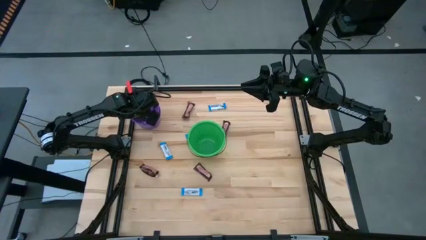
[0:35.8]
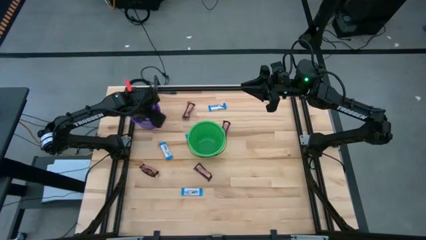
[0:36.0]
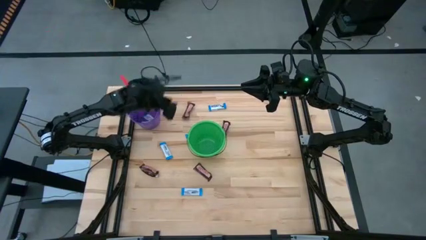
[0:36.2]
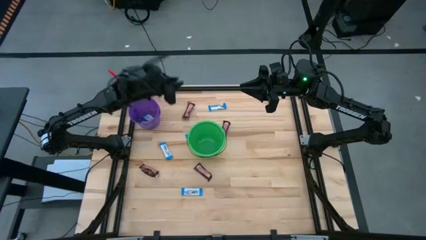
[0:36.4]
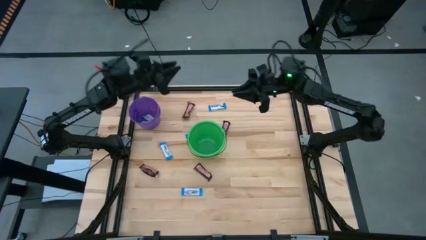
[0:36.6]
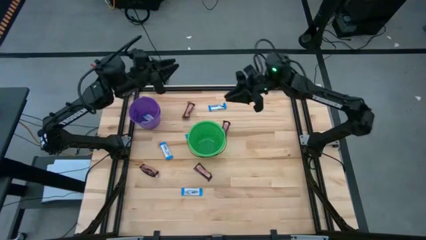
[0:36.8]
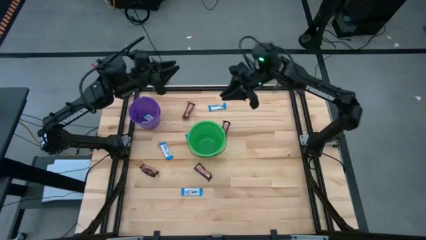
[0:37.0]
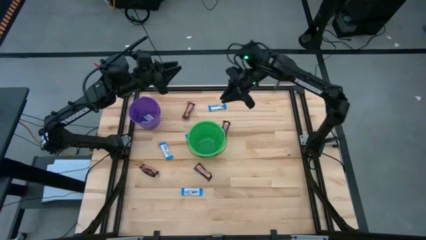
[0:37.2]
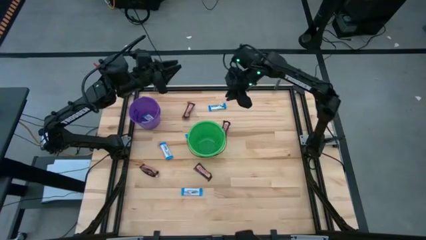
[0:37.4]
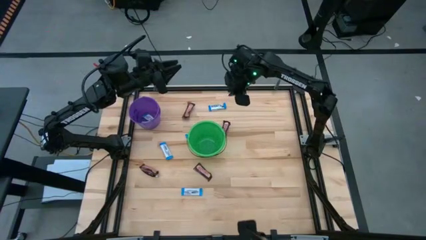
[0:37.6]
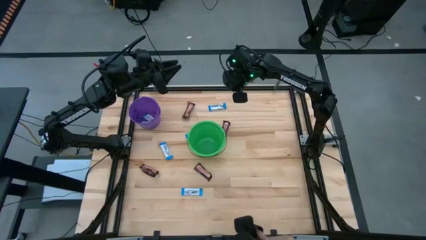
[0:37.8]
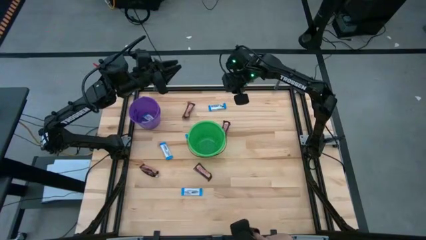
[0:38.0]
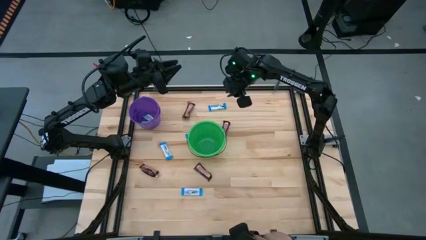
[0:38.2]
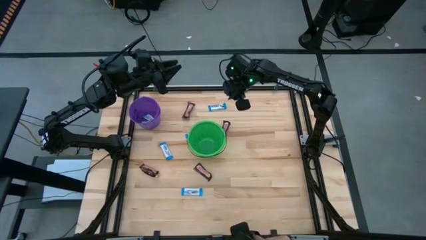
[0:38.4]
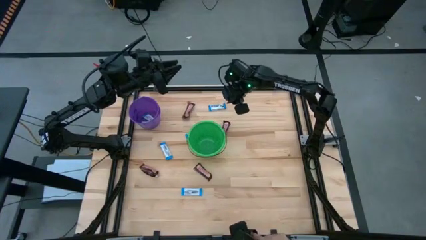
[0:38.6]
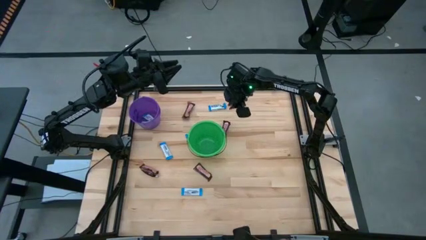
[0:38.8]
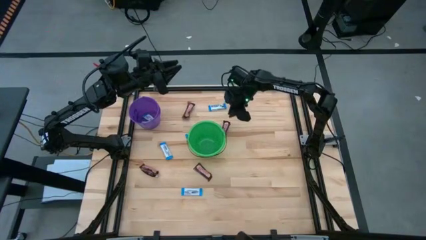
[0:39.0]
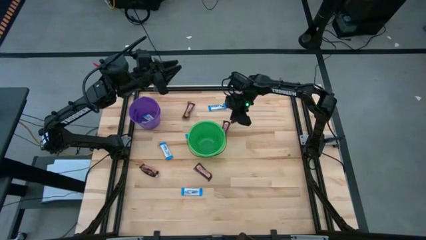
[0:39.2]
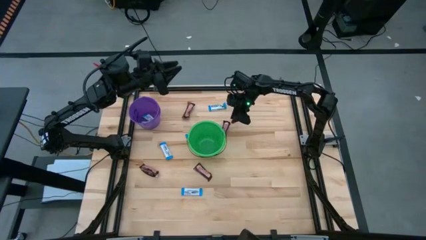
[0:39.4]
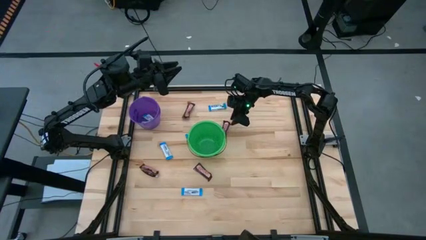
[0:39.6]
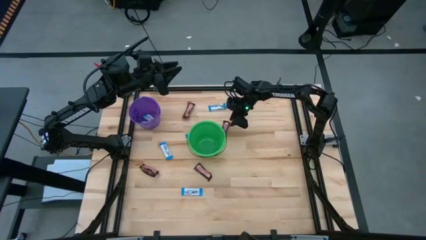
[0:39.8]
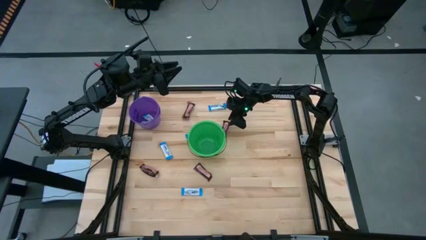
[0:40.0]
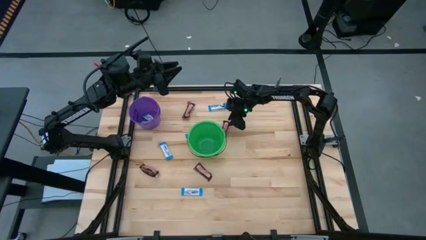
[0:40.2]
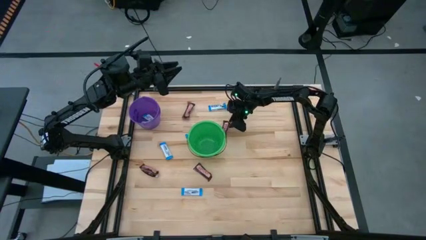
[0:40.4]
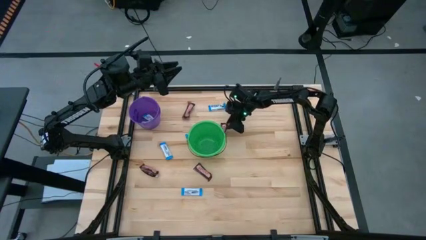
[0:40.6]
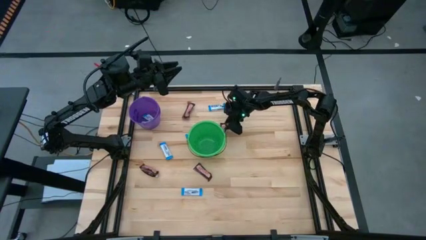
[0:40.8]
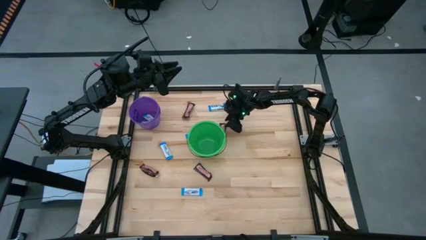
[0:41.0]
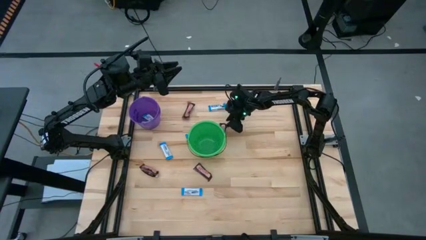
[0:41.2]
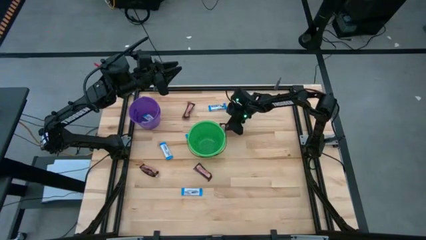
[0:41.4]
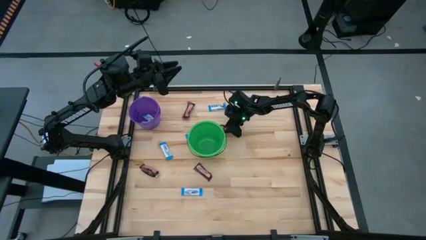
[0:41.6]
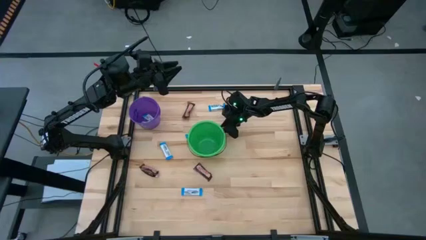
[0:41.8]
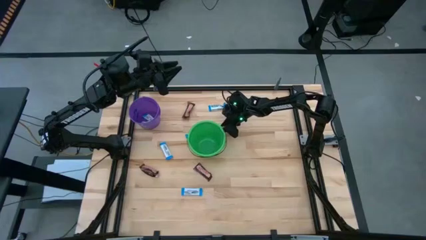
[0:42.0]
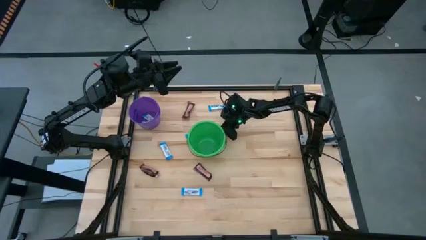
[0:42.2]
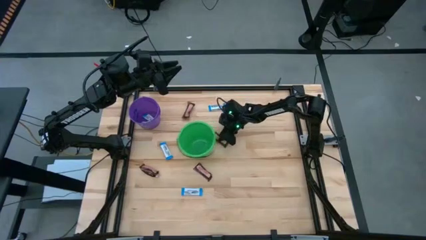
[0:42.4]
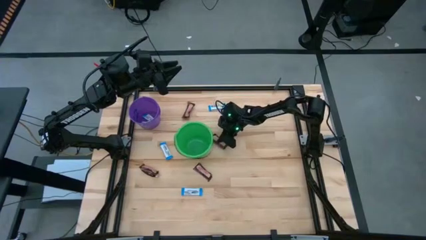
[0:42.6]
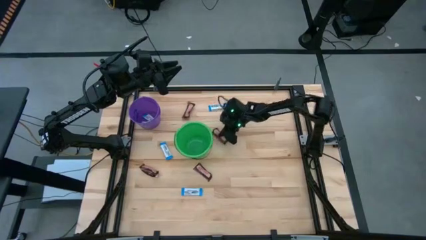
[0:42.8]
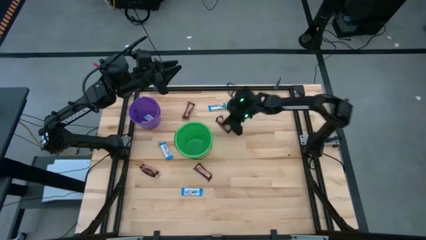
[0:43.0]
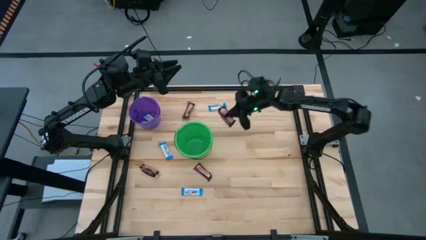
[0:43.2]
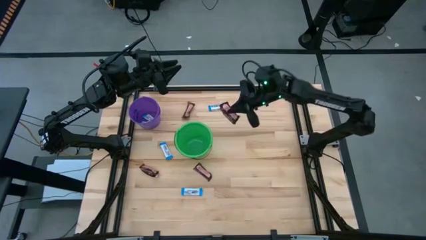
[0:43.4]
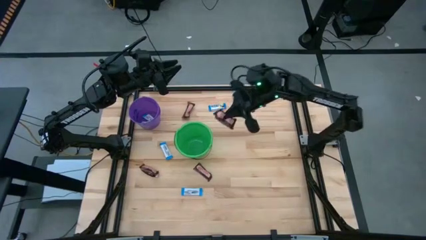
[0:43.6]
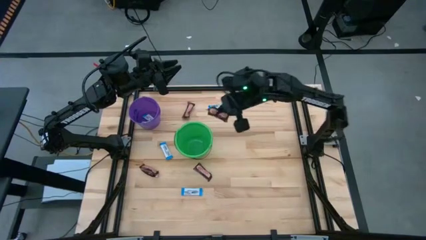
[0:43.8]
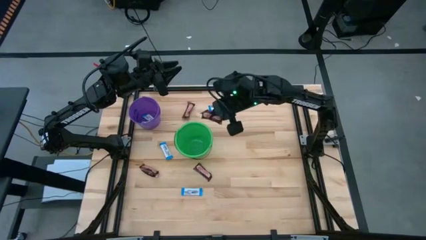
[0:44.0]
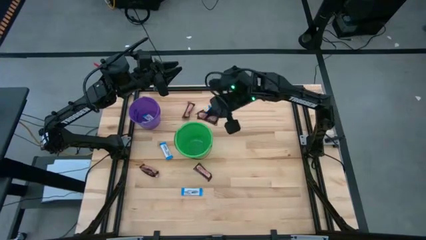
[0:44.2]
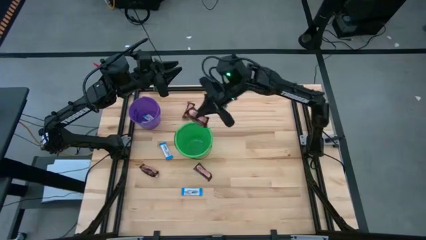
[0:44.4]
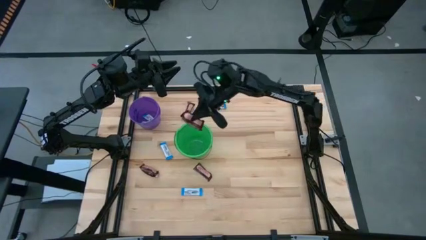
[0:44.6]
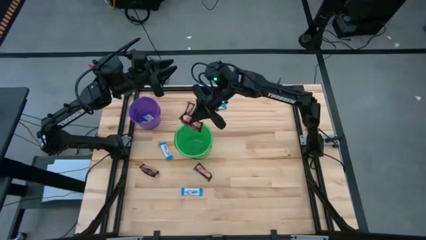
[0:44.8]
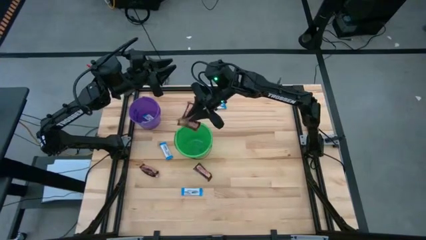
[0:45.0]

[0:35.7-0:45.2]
Task: Sort candy by brand, put in halloween buckets
Put the black chocolate bar into the green bucket

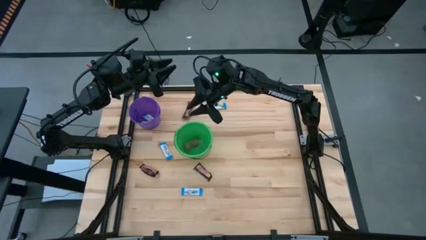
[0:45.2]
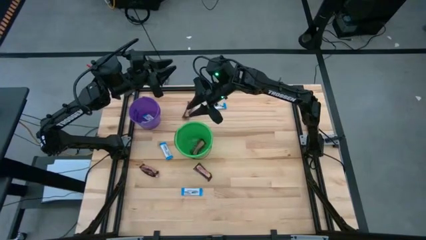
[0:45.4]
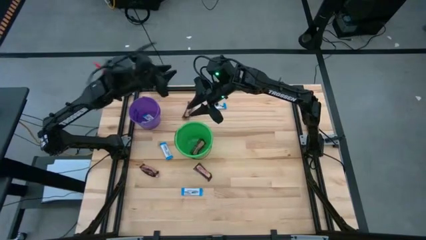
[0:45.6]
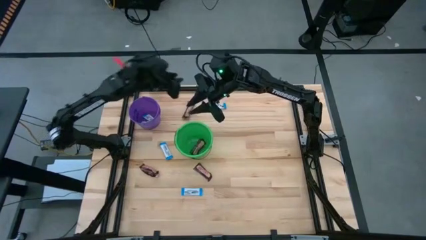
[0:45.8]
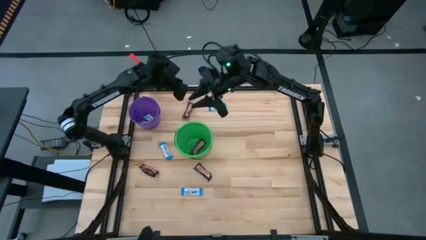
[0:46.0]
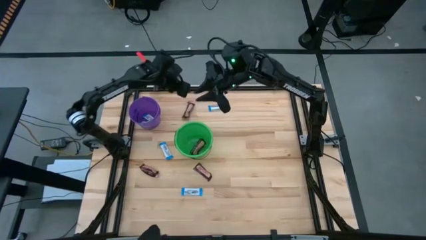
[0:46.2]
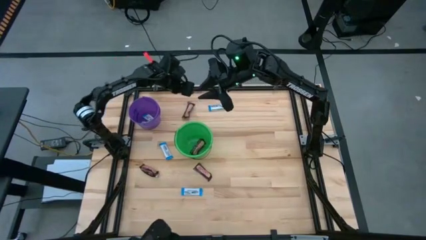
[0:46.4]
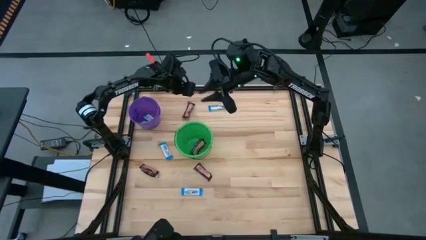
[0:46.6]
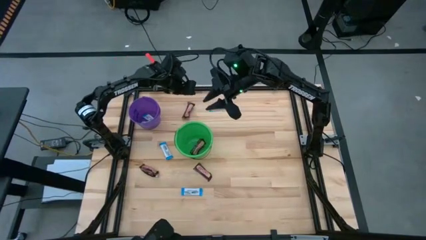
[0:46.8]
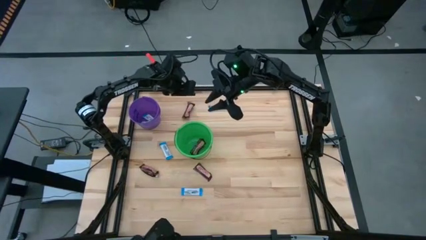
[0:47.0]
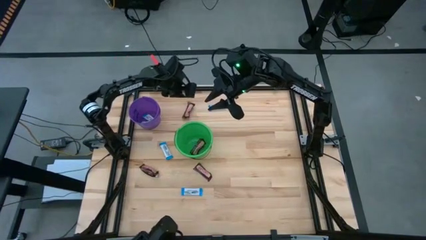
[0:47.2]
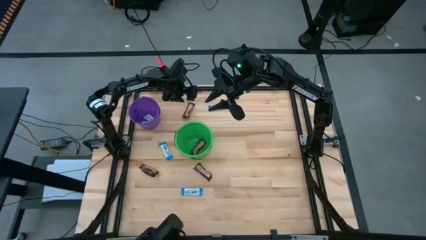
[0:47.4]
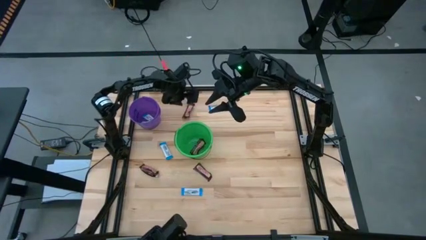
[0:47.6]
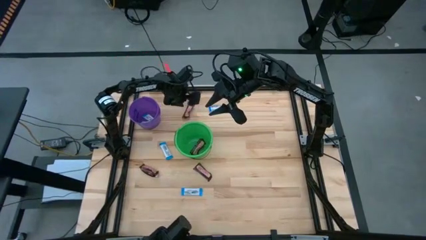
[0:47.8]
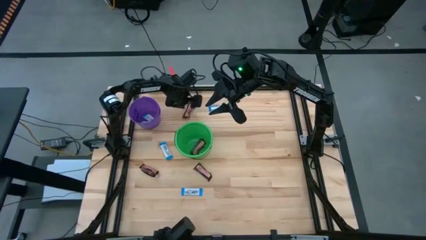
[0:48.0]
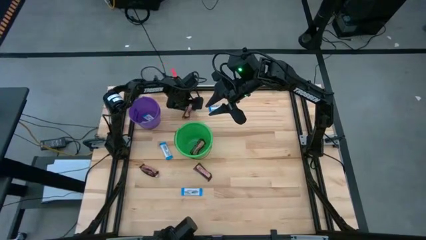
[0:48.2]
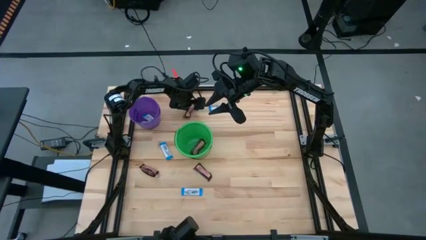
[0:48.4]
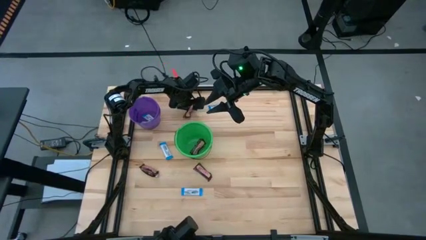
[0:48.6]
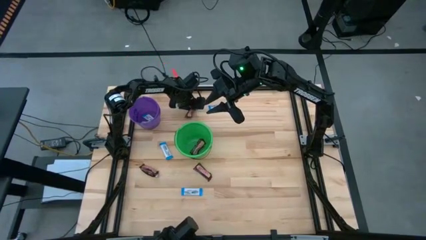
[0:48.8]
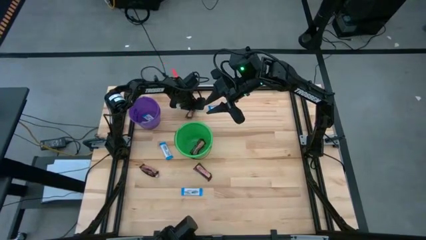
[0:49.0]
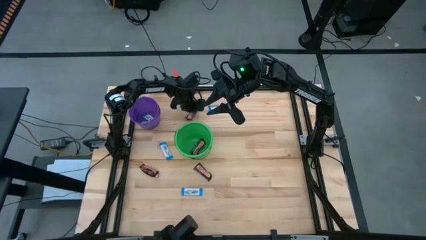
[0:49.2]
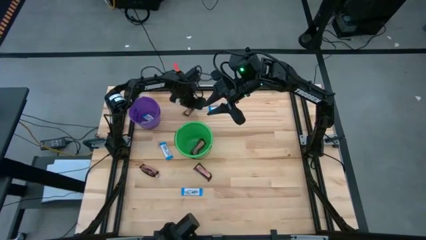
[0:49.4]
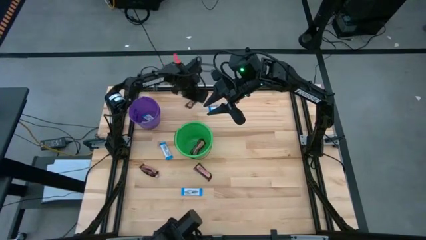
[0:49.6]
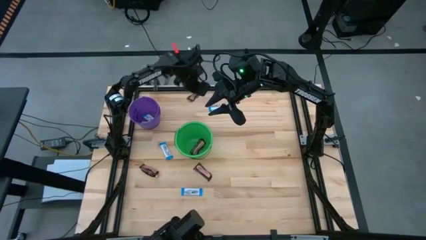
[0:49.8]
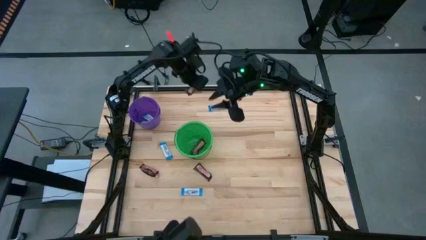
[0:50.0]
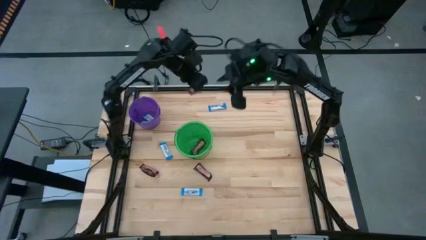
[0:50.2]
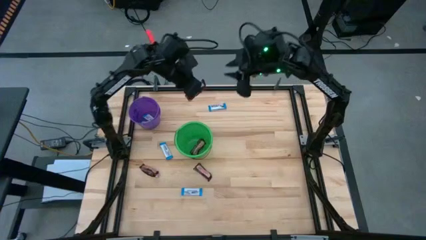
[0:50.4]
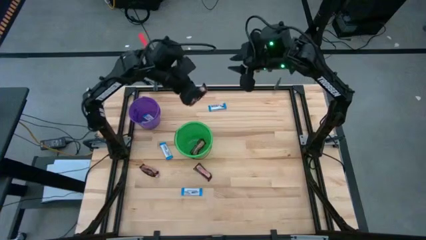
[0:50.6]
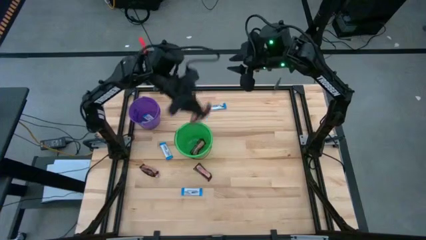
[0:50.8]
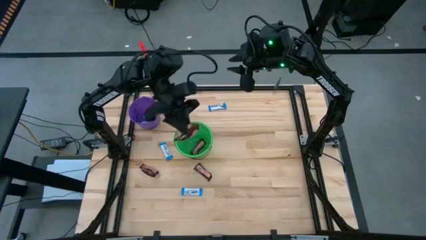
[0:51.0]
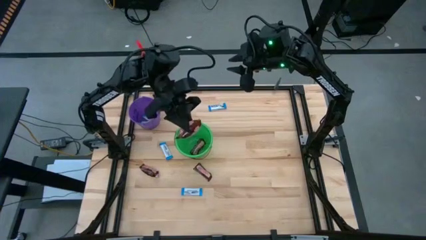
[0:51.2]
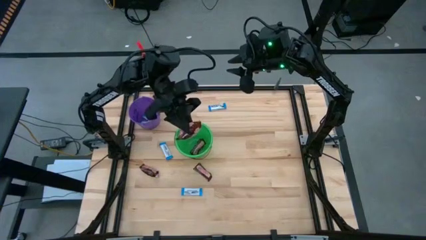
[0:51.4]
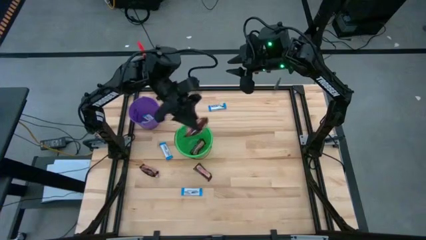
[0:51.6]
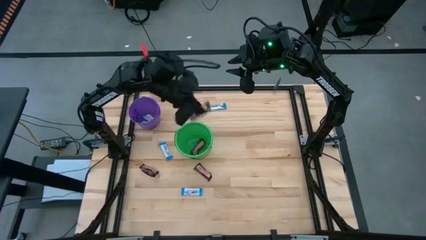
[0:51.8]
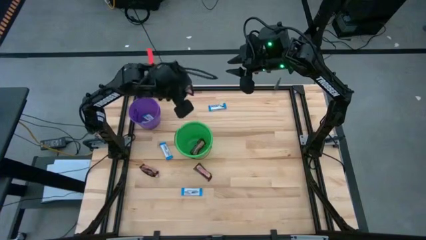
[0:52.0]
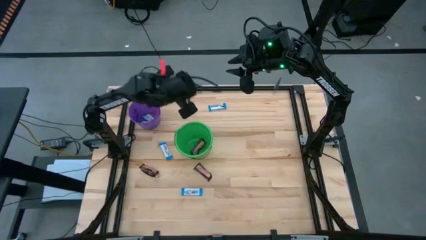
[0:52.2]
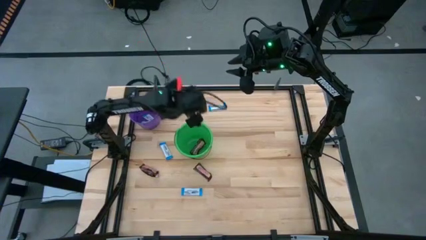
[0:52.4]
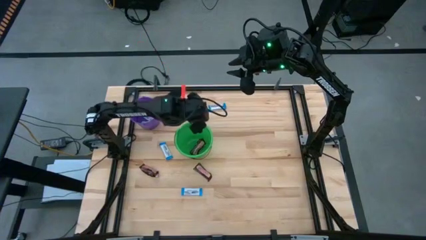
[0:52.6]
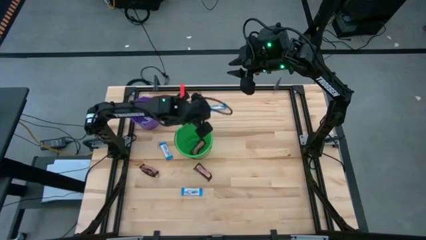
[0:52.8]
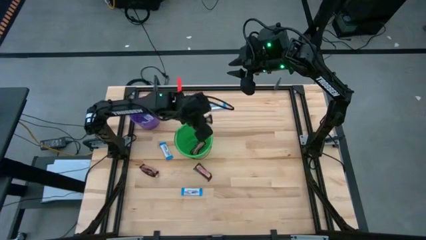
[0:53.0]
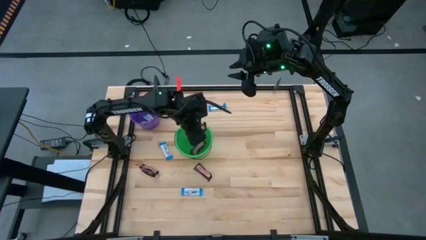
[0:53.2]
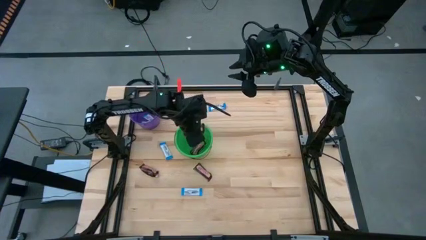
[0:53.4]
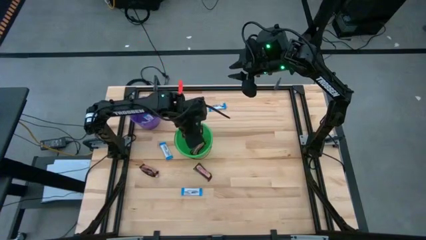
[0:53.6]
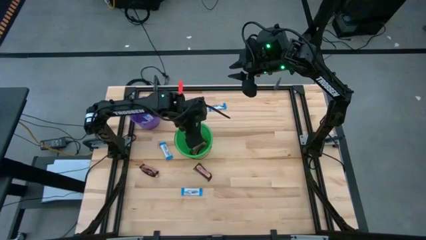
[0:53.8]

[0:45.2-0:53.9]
Put the black chocolate bar into the green bucket
